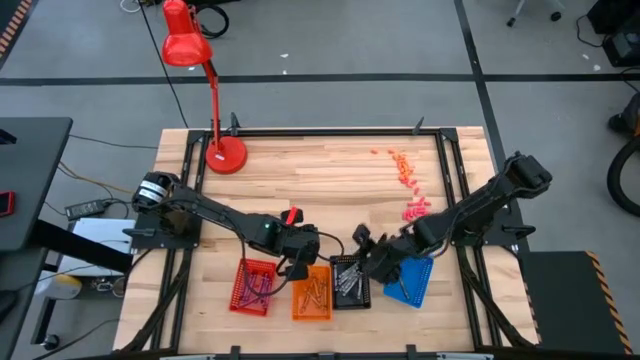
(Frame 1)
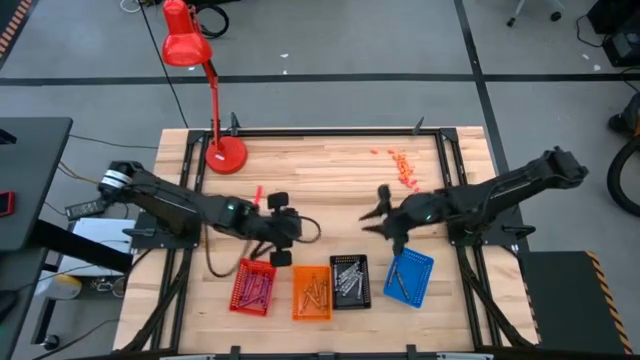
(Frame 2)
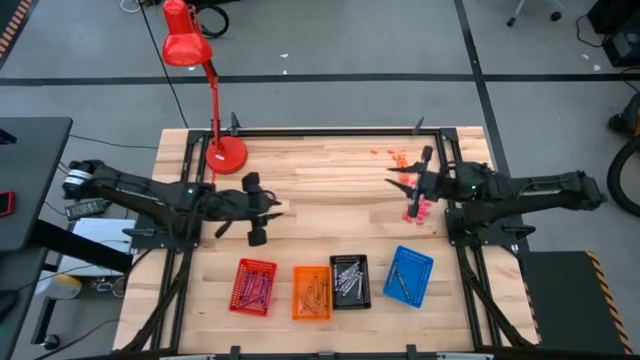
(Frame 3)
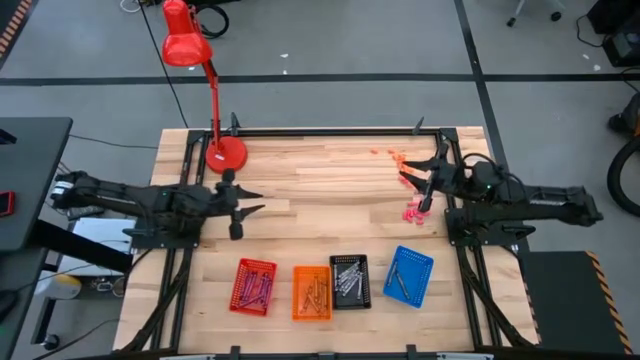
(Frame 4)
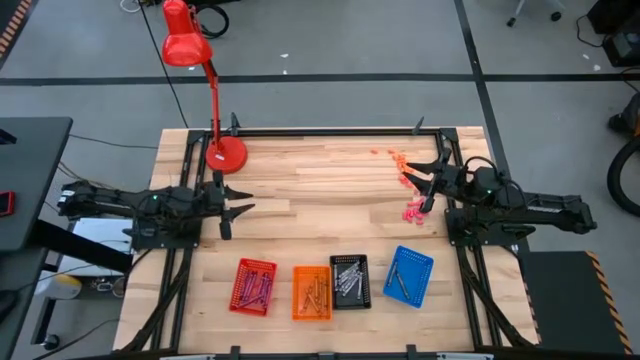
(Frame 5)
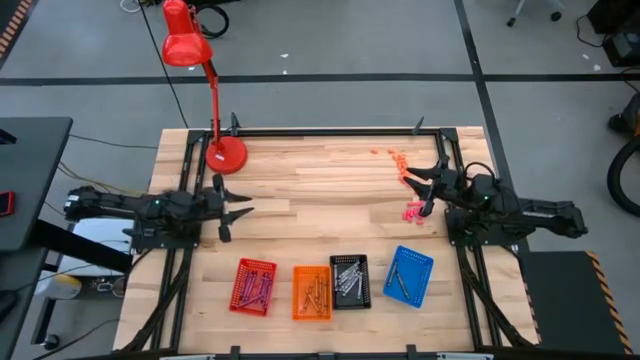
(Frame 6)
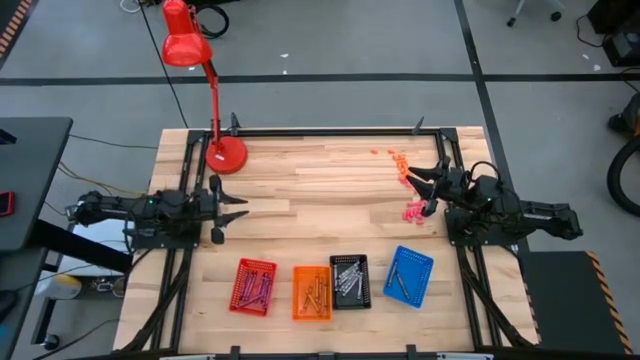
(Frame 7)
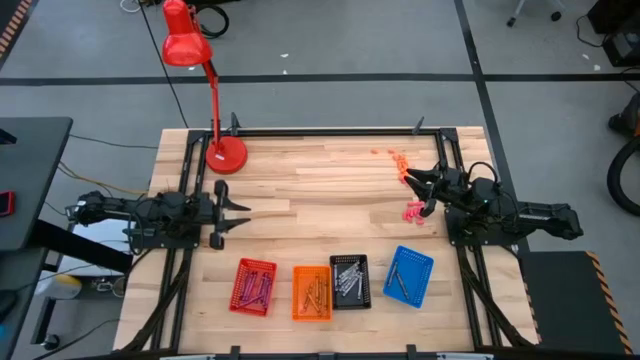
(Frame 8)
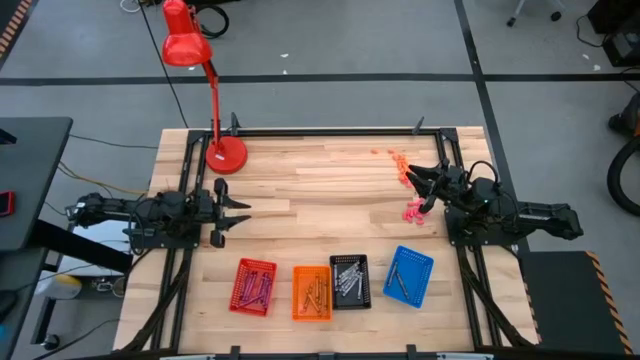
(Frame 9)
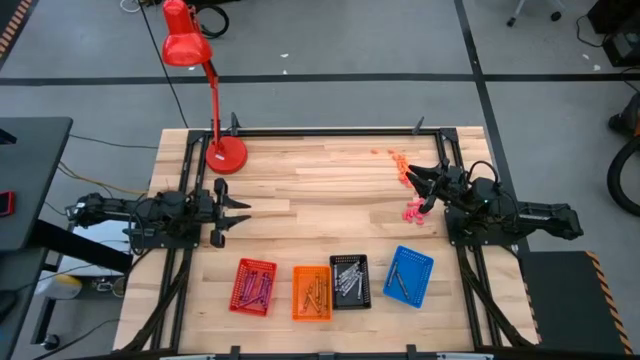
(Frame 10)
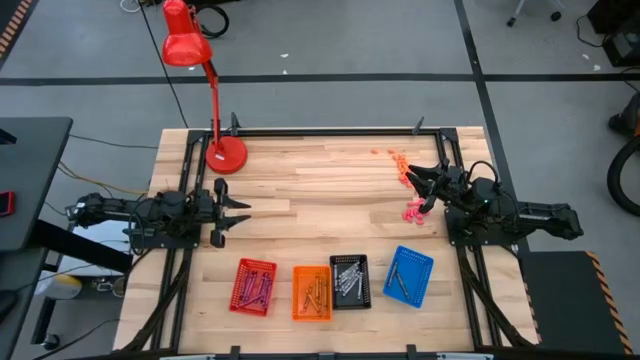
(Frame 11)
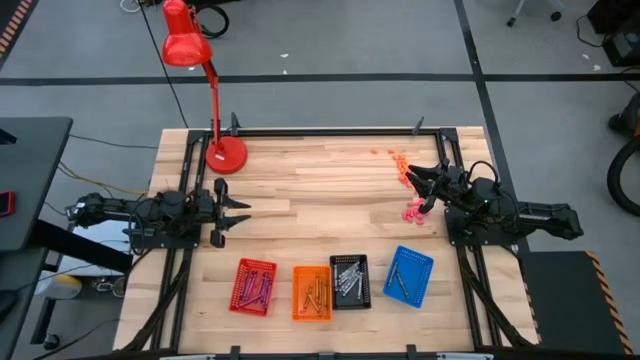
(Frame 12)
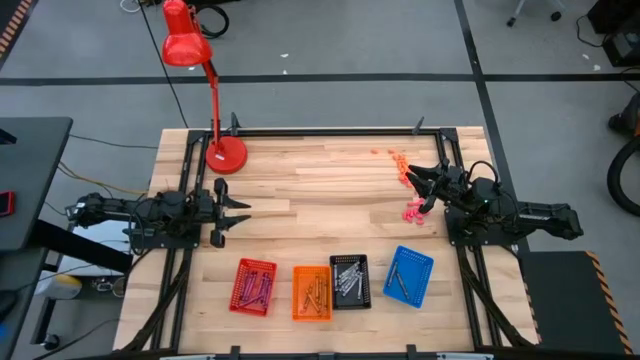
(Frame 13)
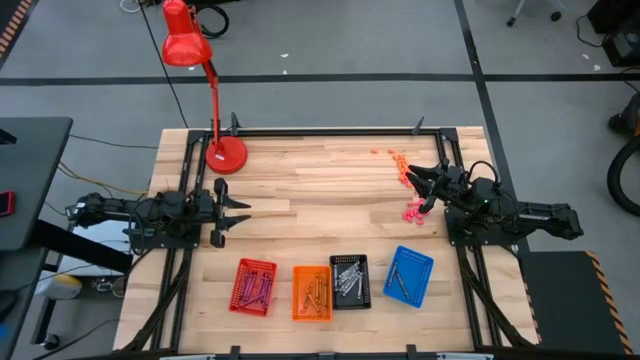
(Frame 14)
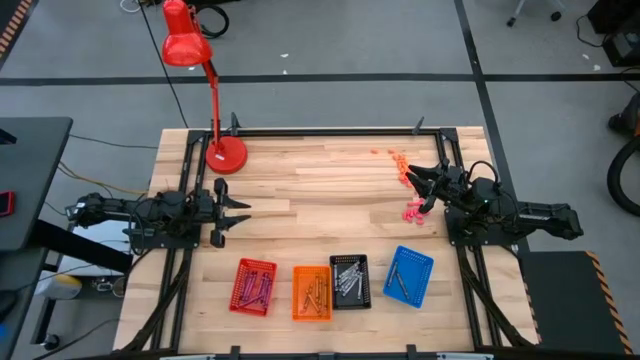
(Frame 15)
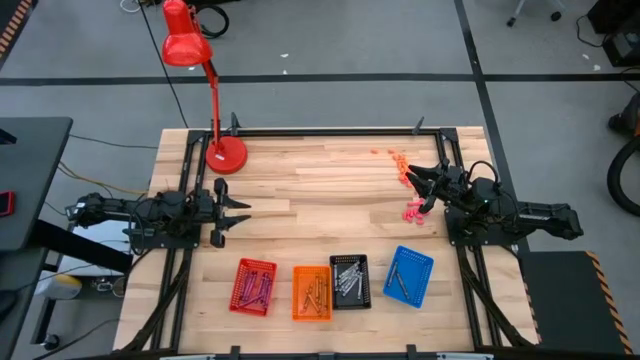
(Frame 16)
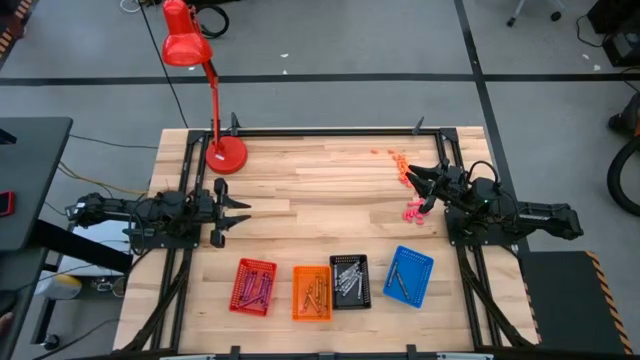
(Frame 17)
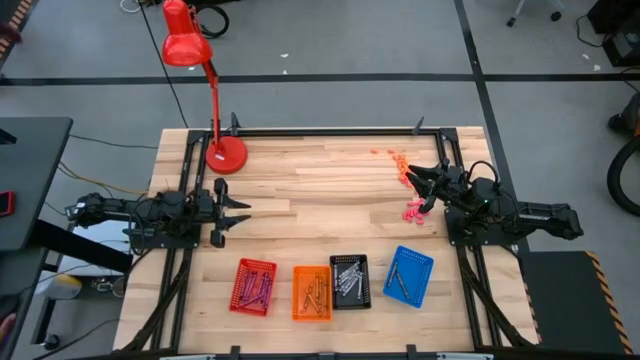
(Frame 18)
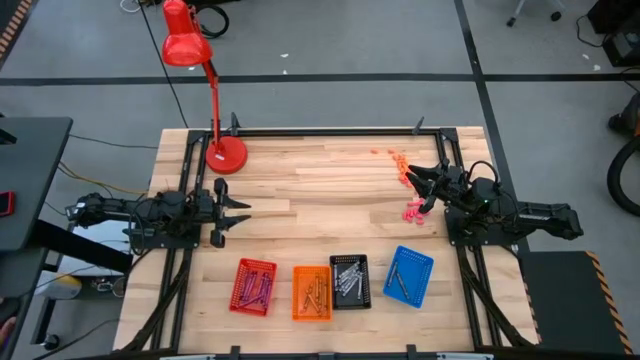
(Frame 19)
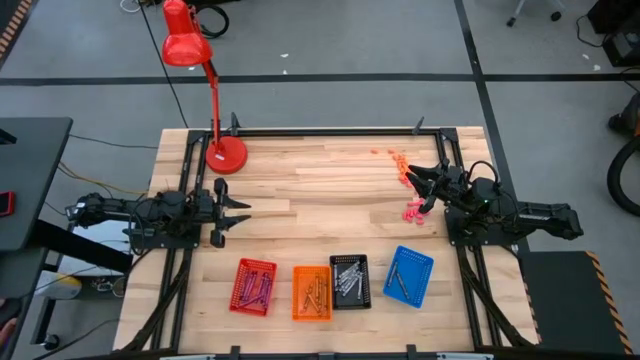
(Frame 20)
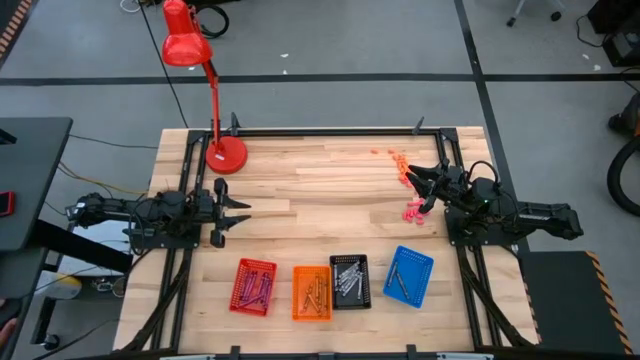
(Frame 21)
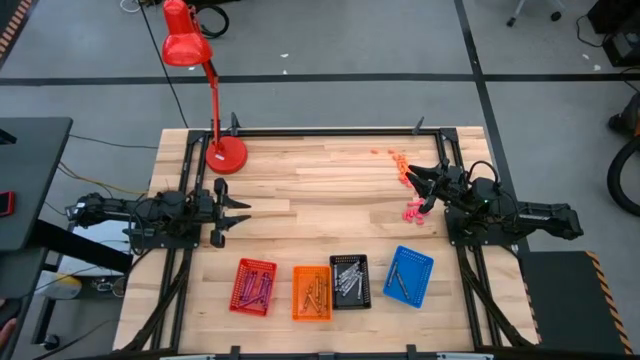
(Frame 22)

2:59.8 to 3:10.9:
Task: Sort crayons
Return to Home Position

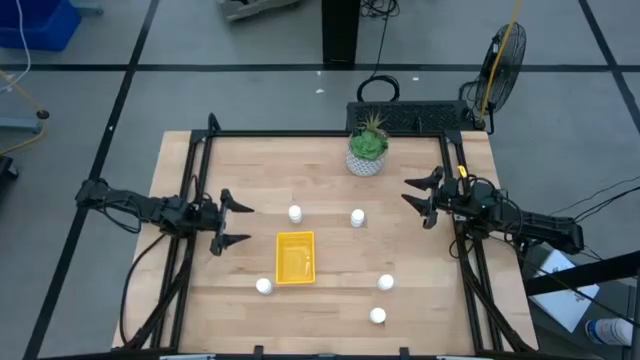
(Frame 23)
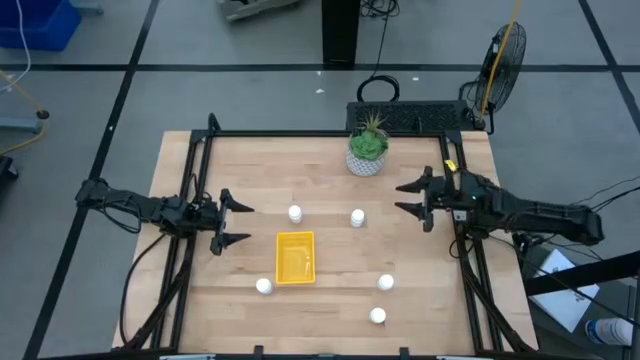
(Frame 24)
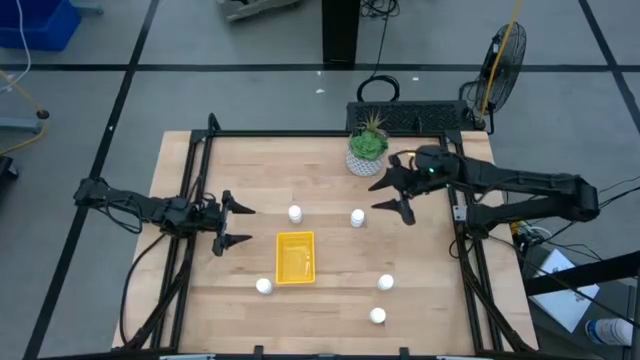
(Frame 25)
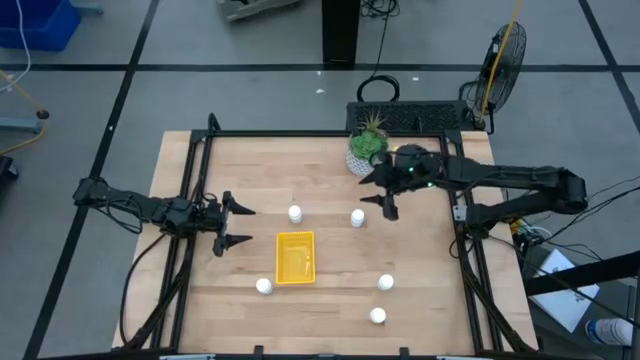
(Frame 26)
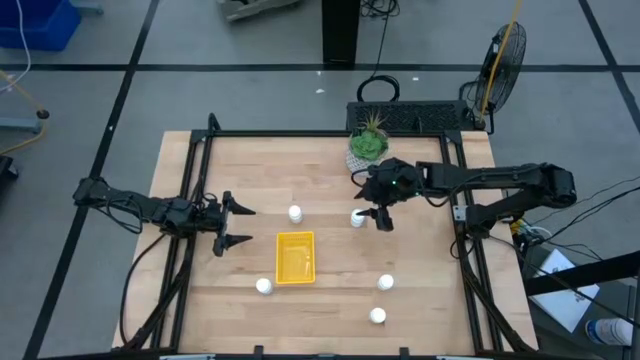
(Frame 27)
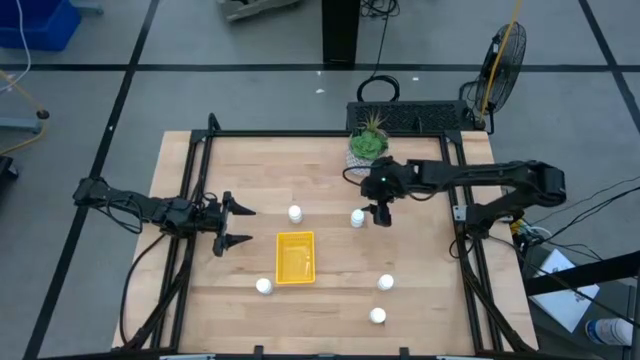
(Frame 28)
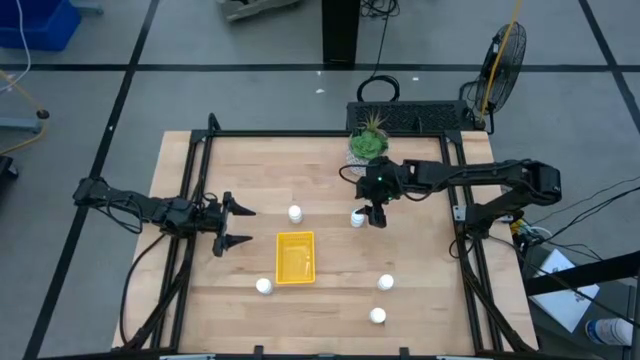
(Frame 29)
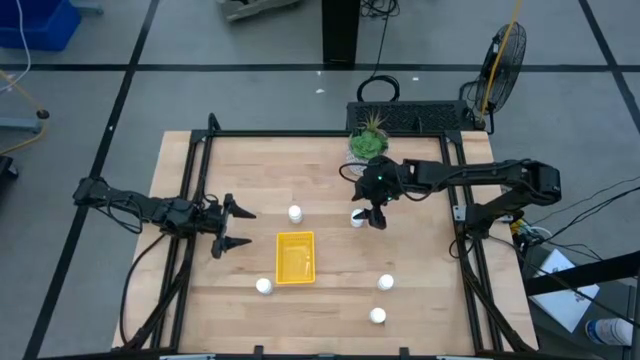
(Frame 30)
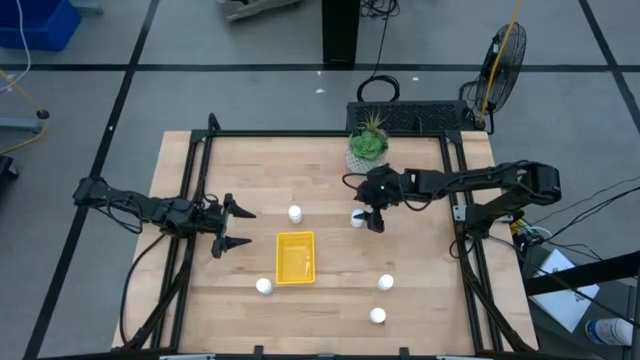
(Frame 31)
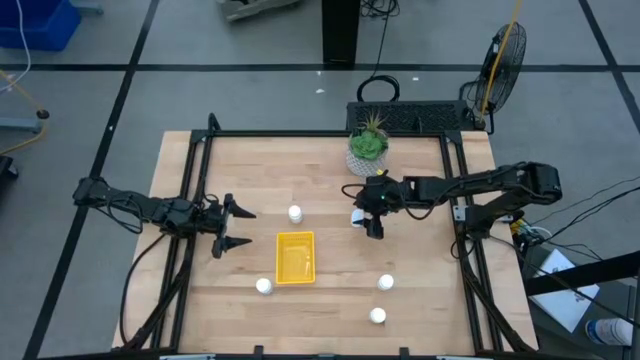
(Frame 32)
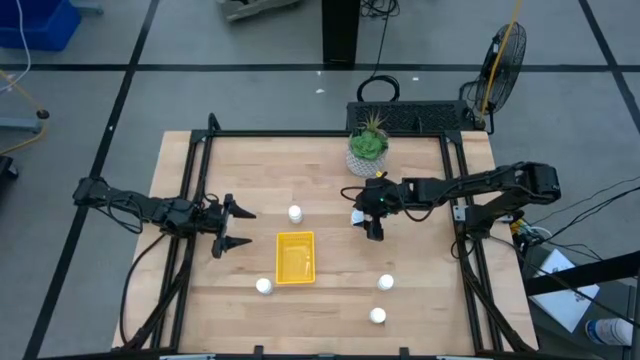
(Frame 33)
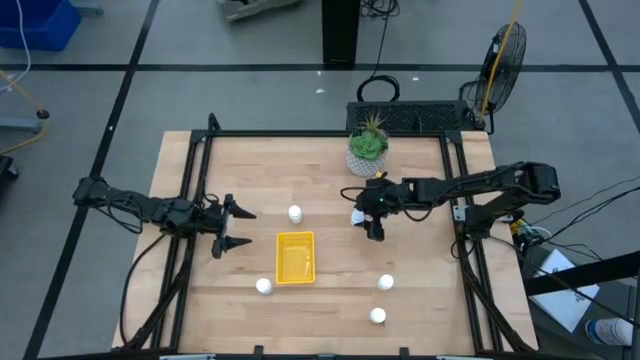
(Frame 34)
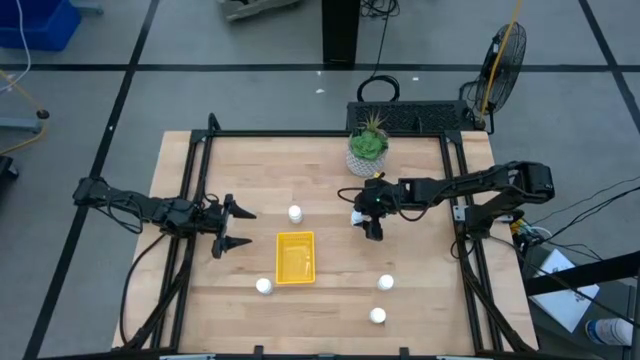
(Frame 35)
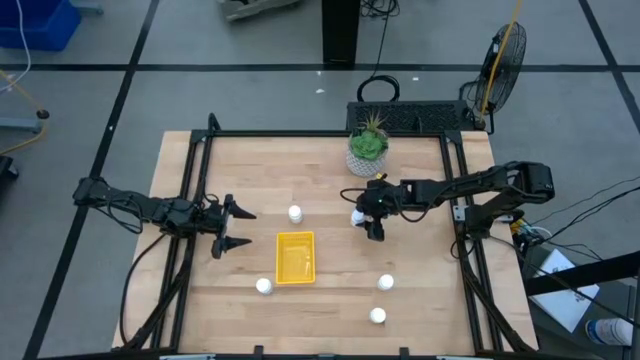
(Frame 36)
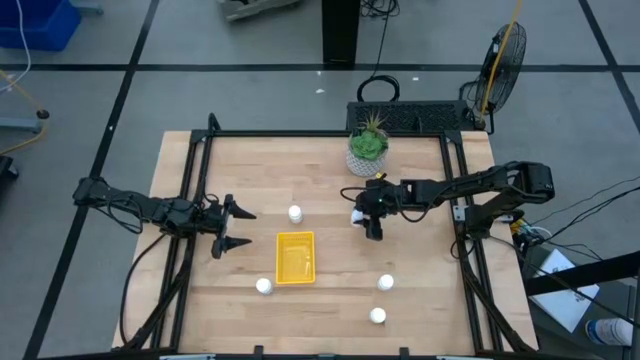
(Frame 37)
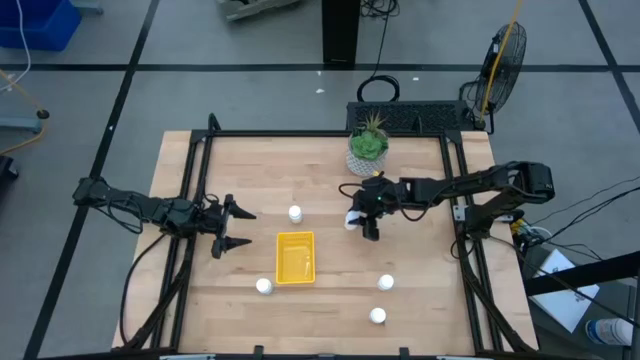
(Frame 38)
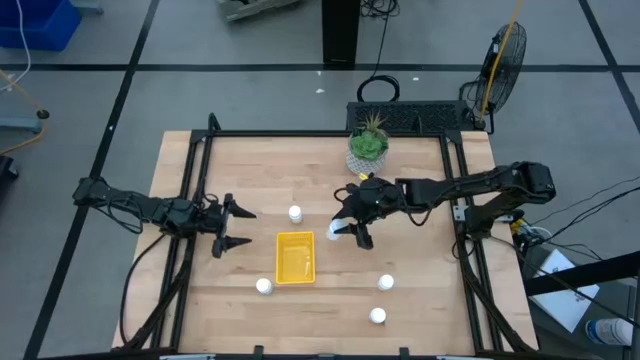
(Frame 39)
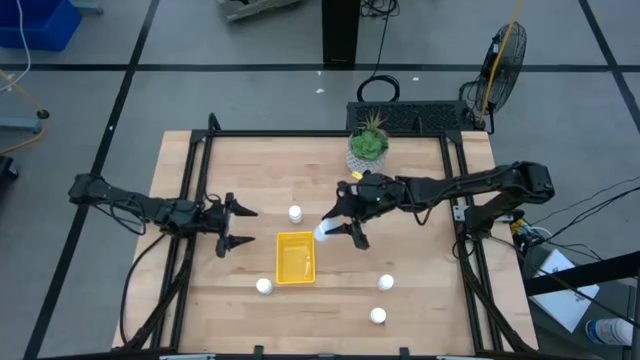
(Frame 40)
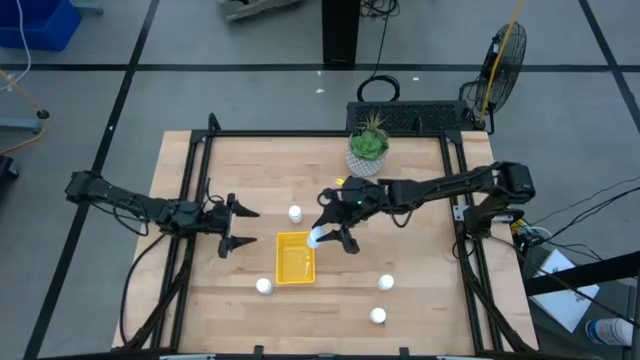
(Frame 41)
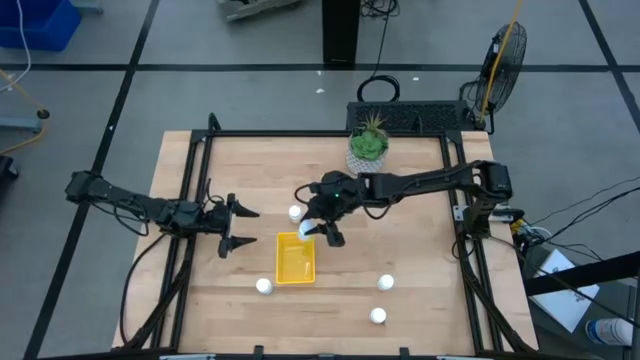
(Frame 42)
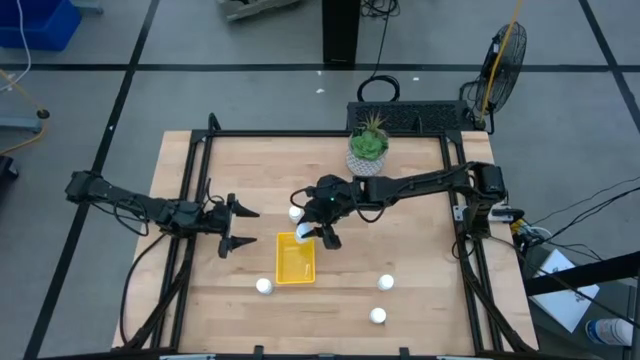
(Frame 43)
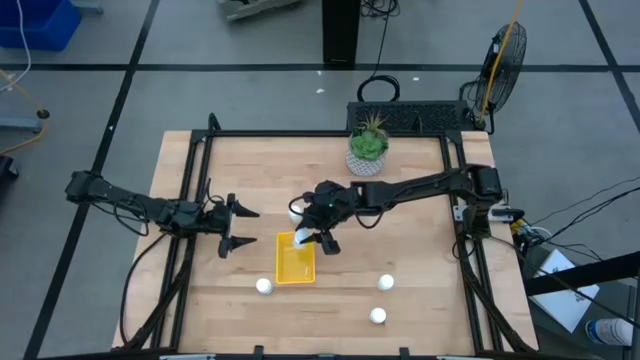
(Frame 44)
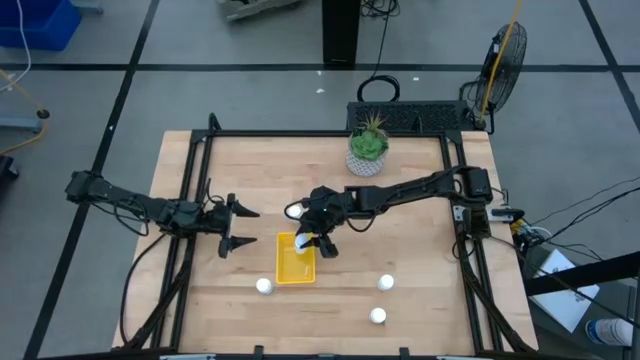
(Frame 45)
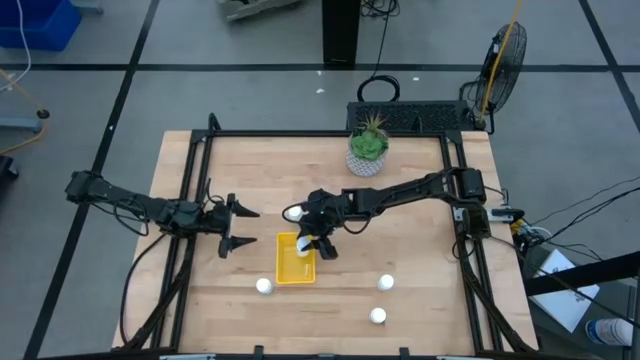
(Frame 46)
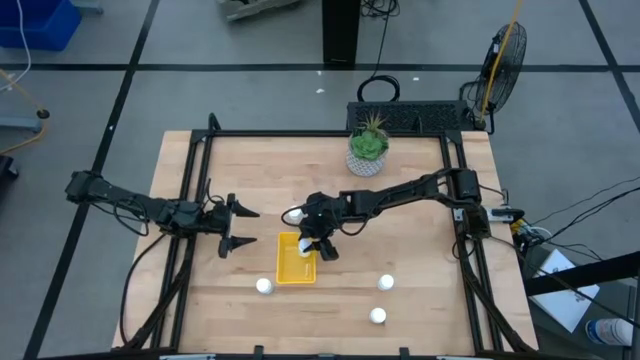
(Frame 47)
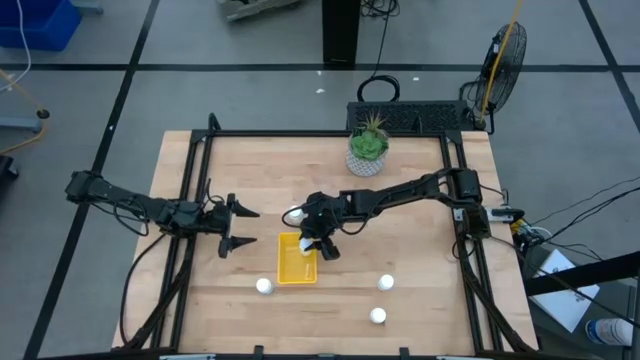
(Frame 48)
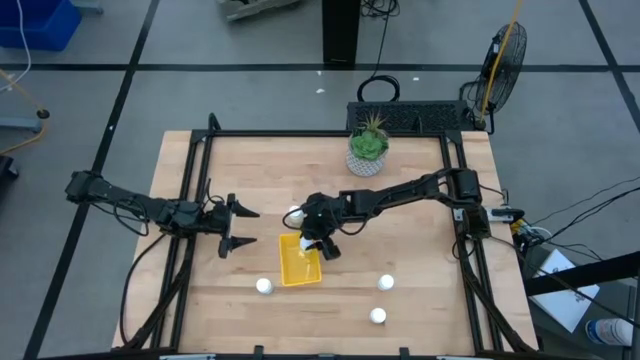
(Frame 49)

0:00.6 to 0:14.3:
Task: Pick and place pill bottles into a basket
Put the white pill bottle into the yellow basket
